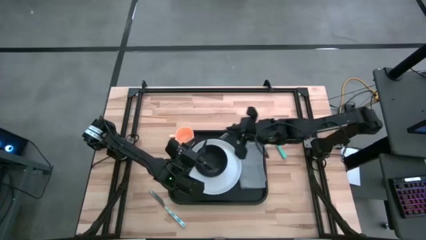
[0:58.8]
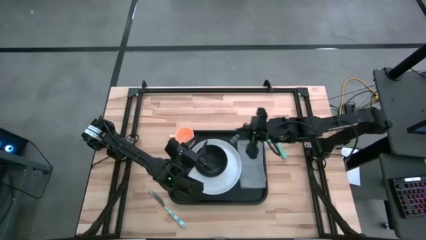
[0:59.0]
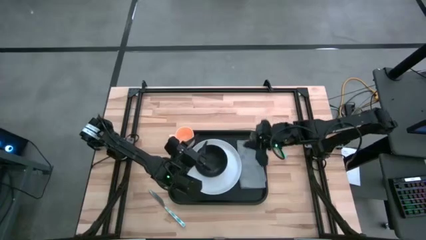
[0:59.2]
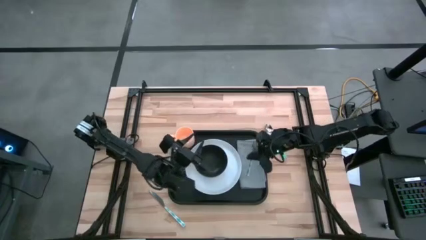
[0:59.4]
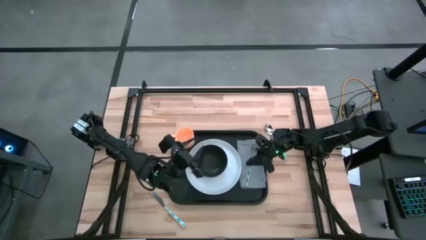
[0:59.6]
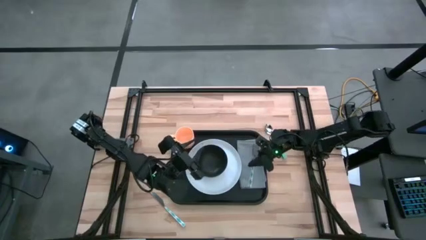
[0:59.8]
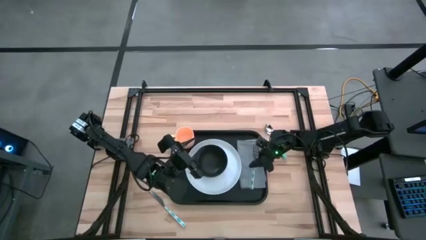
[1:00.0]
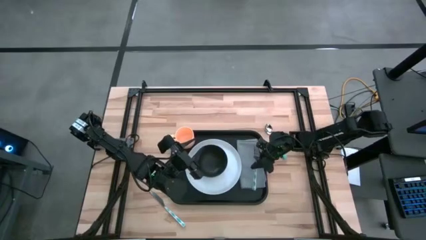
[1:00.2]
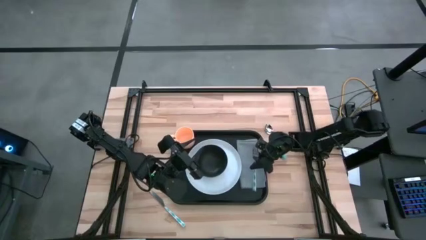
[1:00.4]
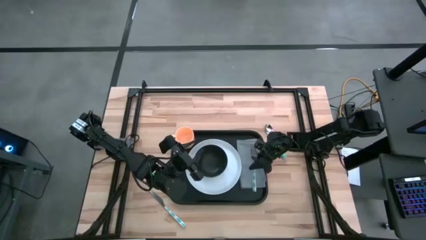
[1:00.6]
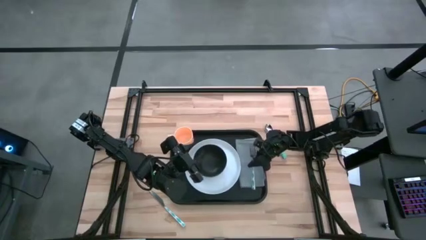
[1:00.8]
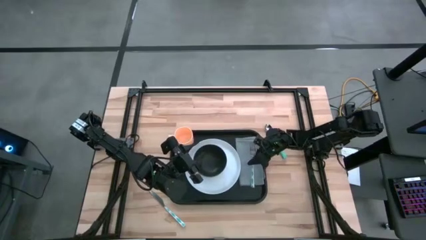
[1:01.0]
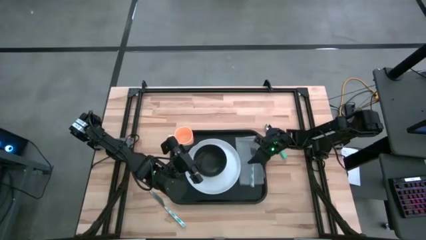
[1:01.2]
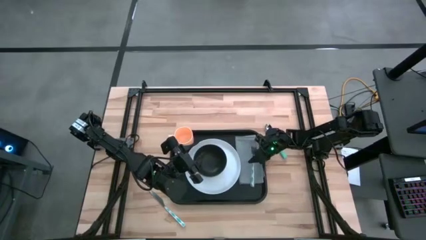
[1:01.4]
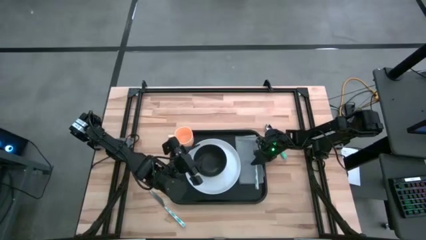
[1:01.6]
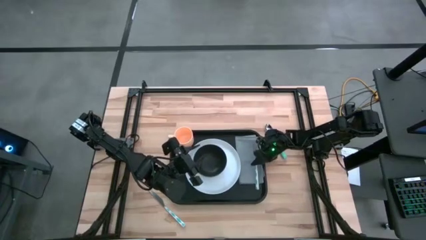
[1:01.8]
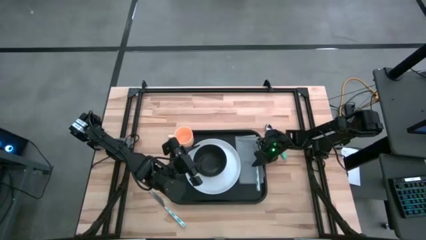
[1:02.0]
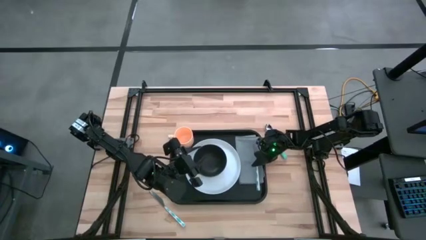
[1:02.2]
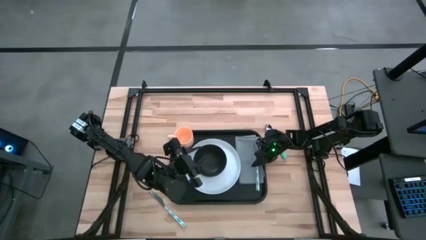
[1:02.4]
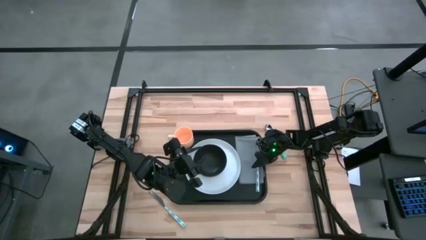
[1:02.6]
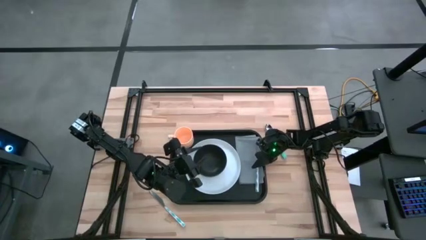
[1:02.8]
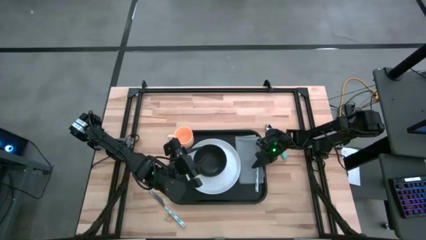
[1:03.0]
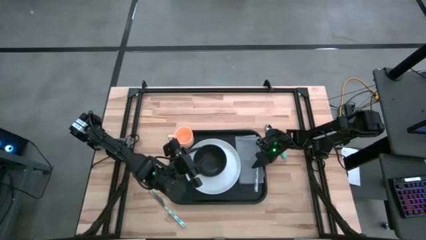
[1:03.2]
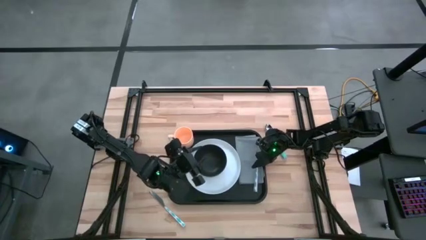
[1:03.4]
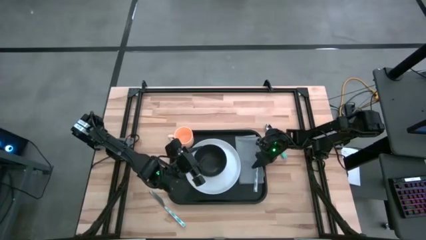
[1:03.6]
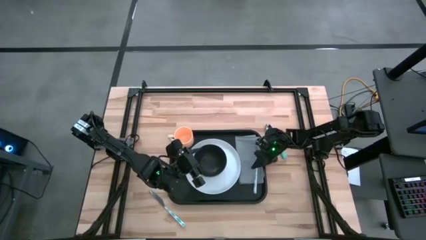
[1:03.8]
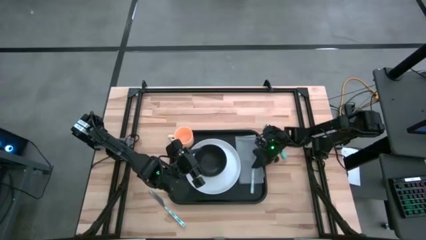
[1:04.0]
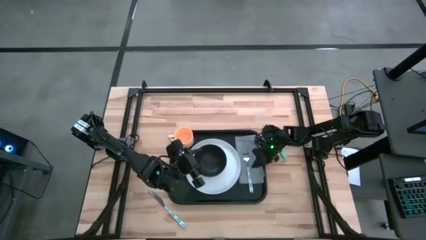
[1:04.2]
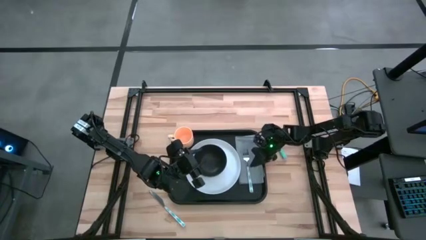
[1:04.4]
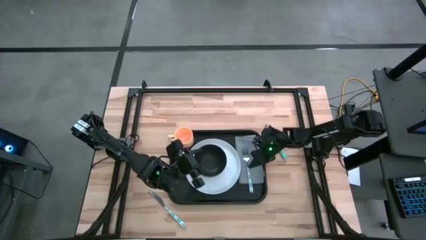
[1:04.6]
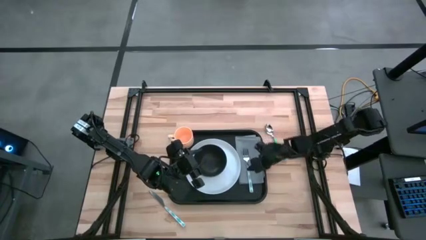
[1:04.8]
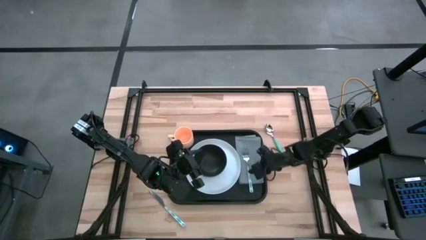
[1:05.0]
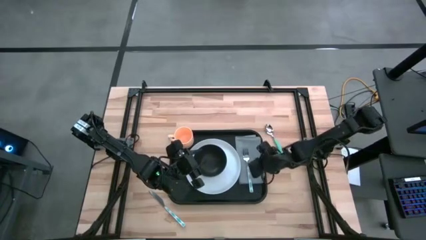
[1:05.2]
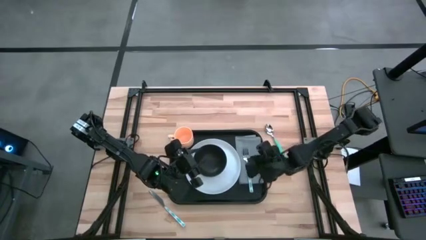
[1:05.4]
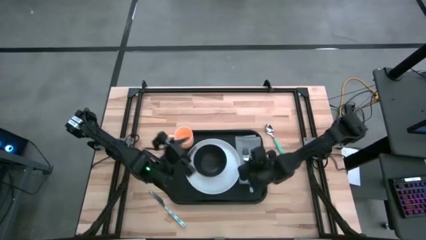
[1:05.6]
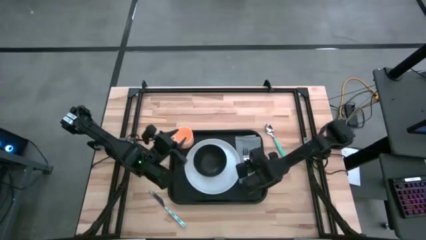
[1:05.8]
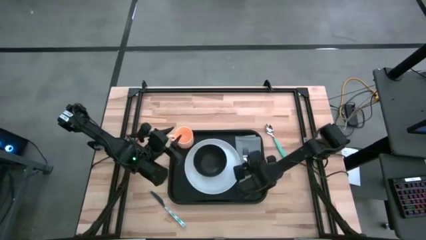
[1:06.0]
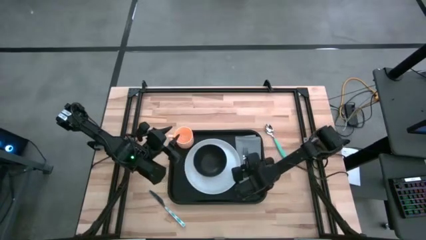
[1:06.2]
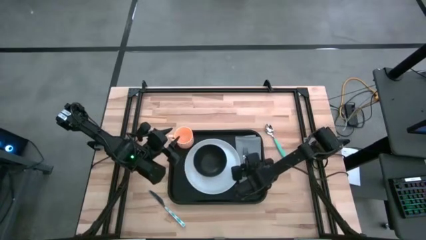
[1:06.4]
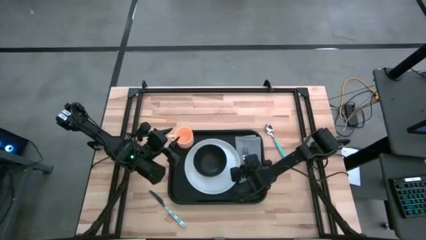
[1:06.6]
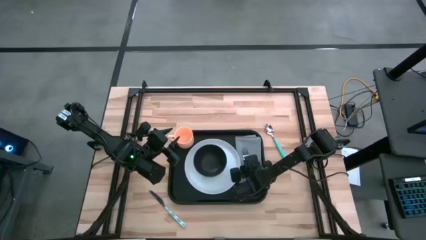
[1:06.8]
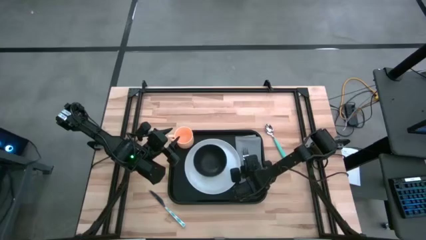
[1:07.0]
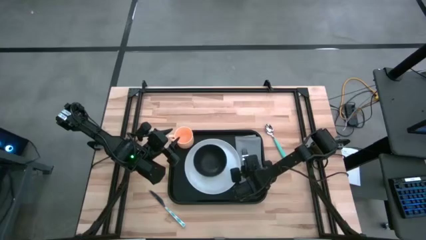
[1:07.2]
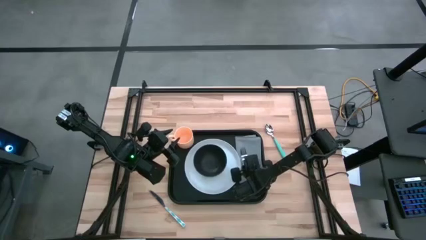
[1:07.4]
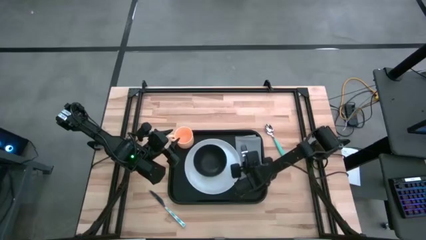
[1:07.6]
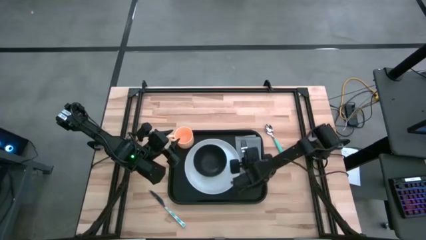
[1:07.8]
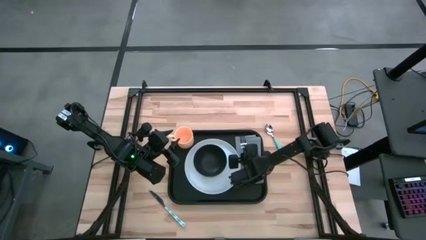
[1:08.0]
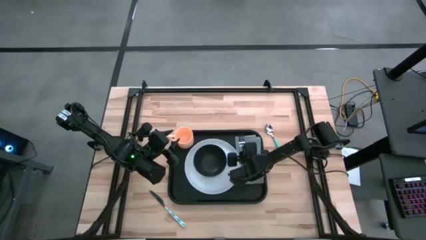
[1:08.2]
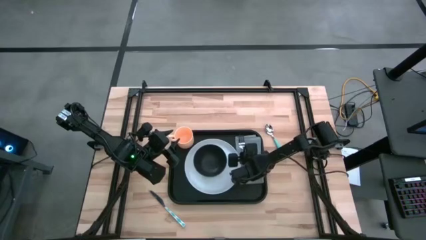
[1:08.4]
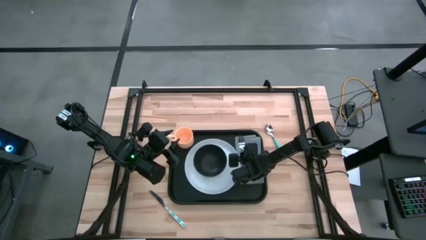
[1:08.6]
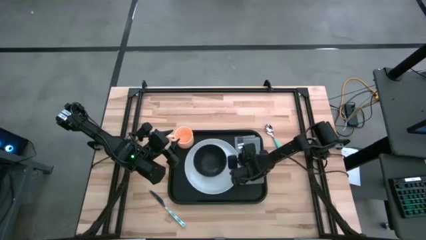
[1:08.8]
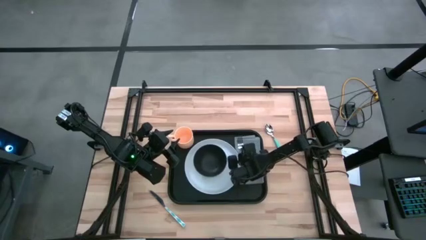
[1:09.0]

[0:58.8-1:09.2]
Task: Set up tray
Put the blue knife on the gray napkin to the right of the blue fork
